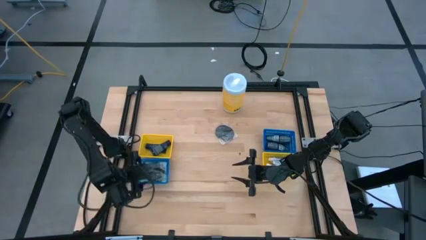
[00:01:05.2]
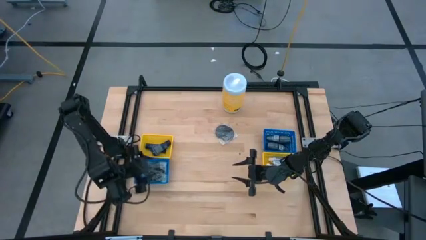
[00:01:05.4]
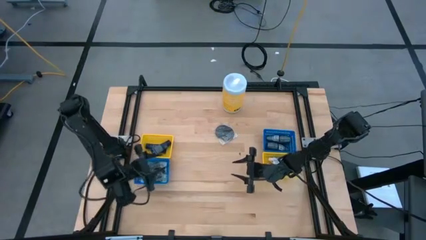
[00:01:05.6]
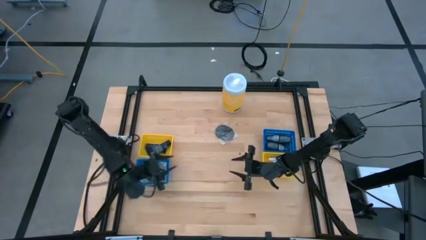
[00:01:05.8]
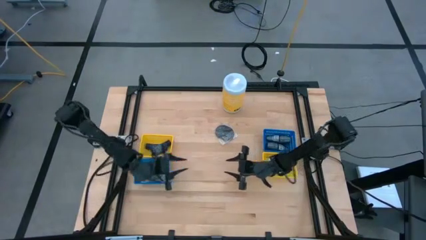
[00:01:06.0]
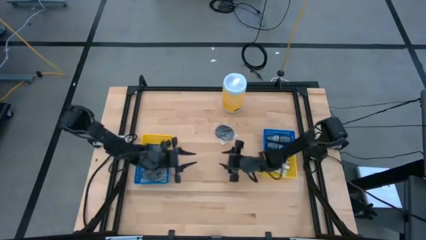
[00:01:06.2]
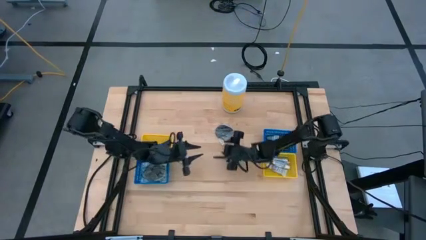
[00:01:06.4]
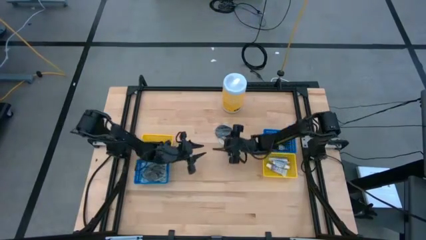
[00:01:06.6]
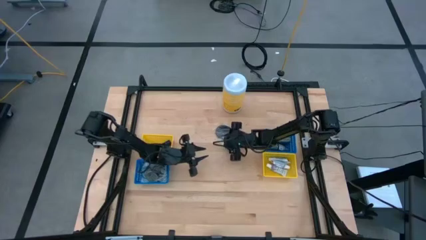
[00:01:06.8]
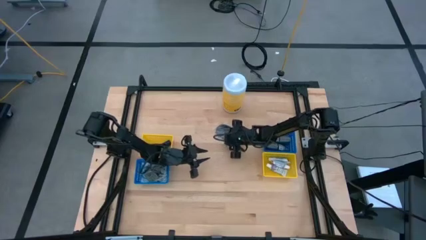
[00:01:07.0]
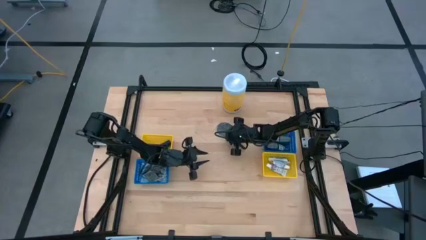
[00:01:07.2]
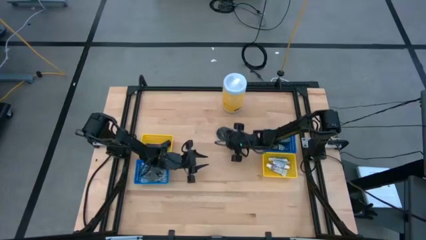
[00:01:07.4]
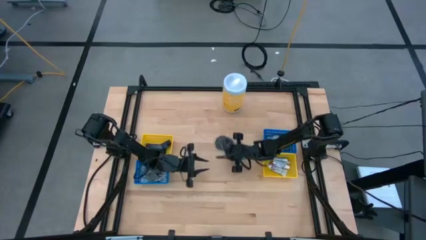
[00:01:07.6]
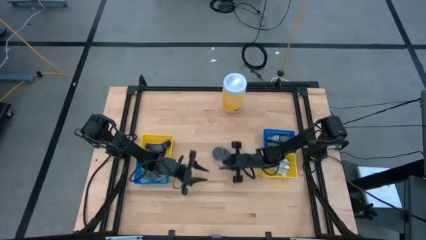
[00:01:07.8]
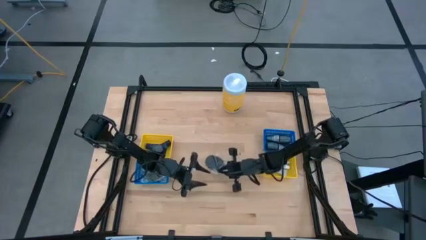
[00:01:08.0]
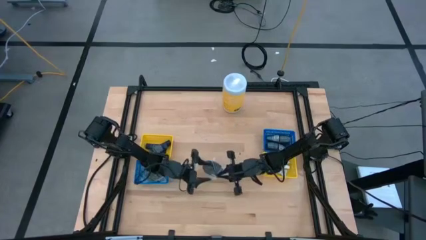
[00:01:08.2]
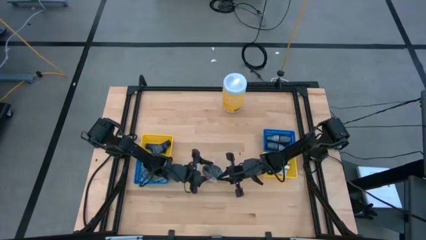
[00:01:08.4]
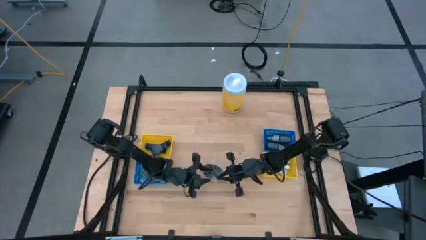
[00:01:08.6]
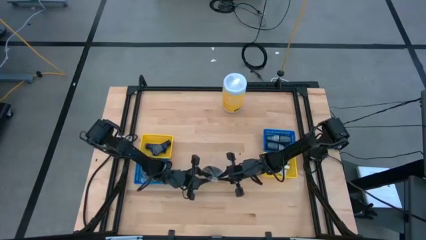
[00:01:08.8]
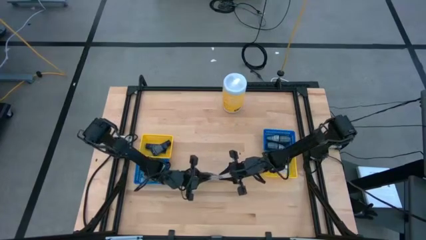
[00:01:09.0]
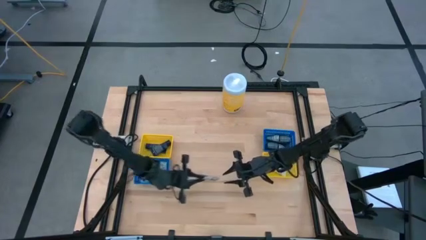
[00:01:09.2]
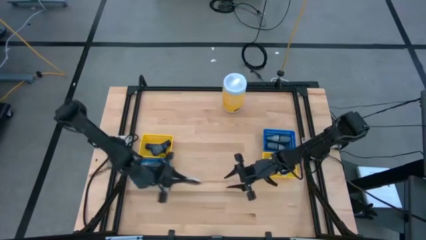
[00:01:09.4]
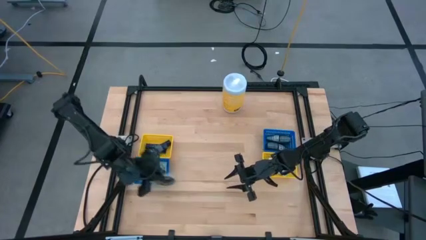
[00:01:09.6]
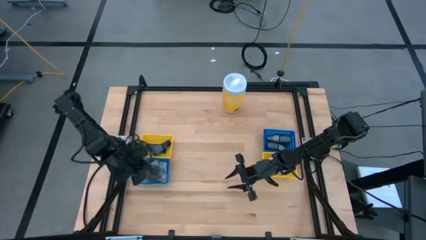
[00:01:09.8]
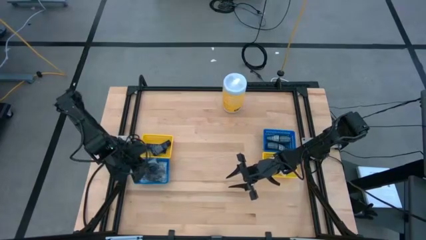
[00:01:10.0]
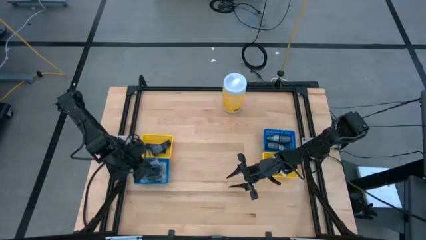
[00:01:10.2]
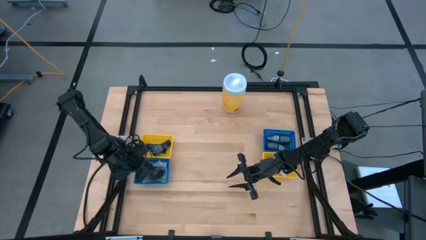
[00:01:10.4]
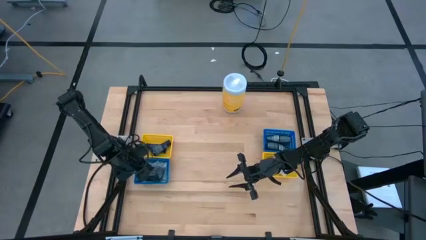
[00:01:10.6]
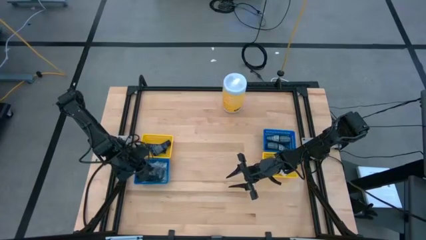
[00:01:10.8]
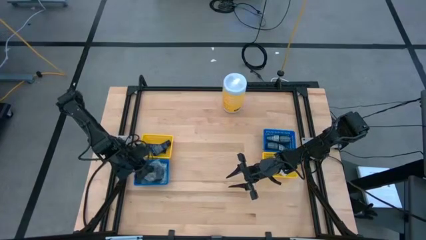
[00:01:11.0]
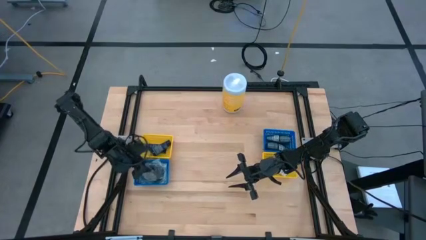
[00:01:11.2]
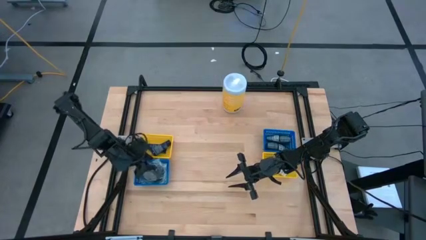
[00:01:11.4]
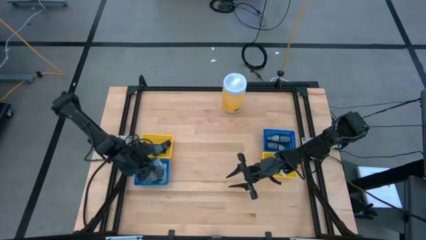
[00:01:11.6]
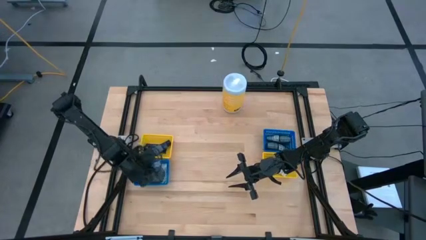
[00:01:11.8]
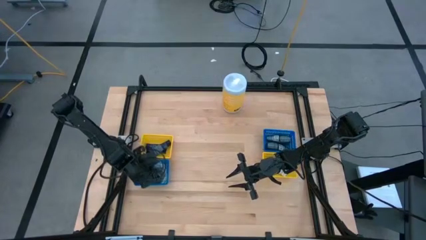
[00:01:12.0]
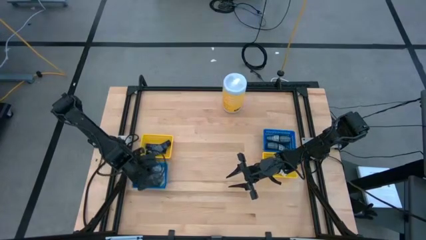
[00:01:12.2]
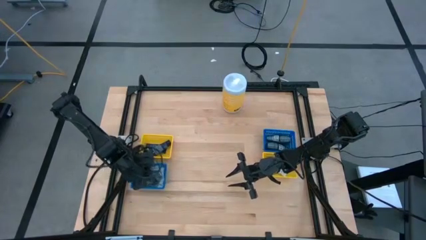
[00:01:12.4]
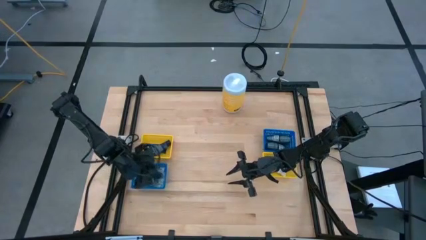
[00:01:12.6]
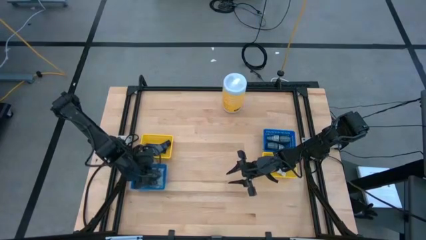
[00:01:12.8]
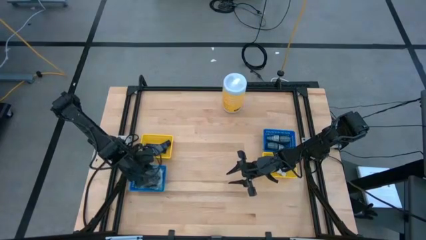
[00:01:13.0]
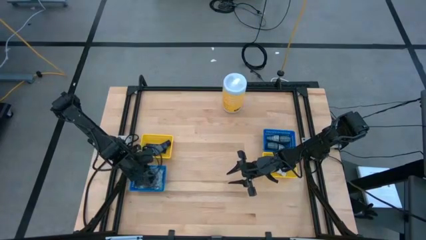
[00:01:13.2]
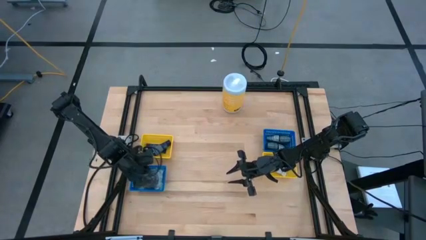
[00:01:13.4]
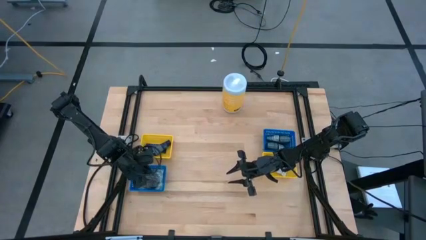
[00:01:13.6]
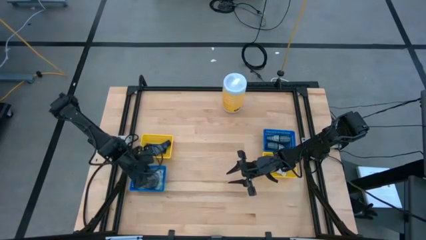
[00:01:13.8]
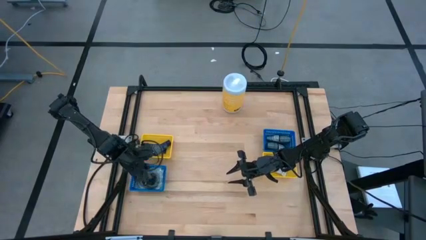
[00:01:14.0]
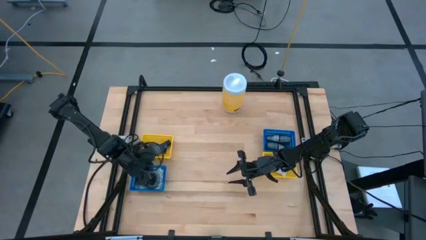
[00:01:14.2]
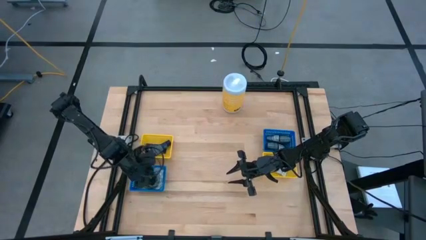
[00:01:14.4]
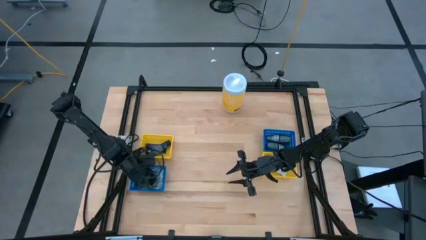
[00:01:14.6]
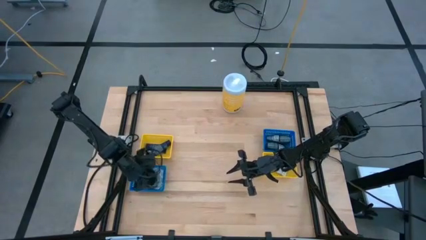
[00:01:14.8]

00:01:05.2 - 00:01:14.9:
Task: Pick & Place Travel size toiletries
Put the black hairbrush into the left blue bin

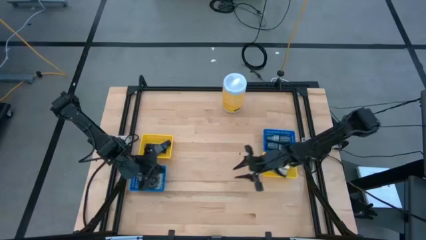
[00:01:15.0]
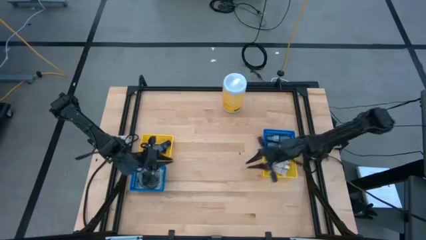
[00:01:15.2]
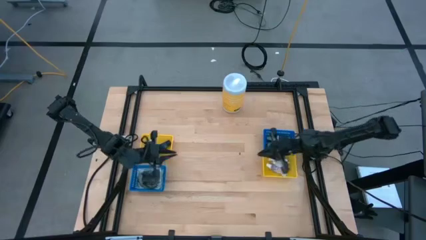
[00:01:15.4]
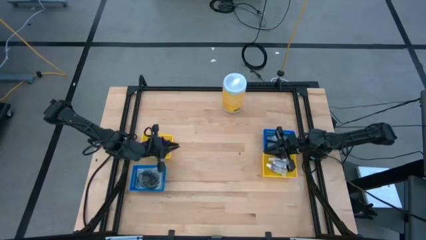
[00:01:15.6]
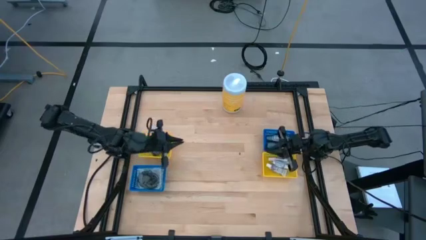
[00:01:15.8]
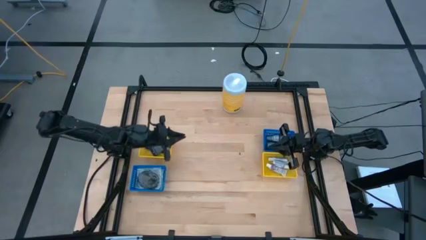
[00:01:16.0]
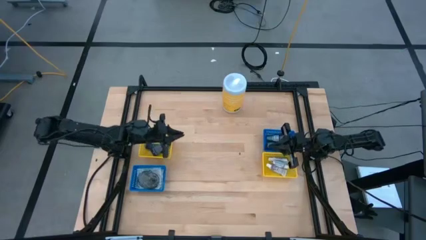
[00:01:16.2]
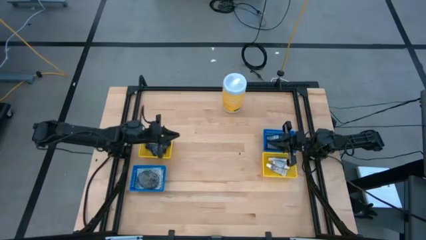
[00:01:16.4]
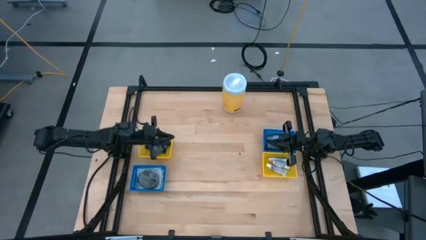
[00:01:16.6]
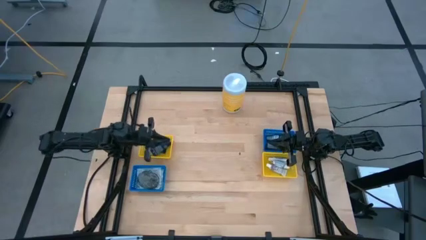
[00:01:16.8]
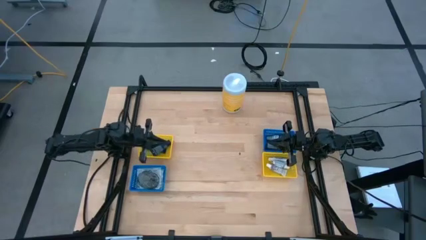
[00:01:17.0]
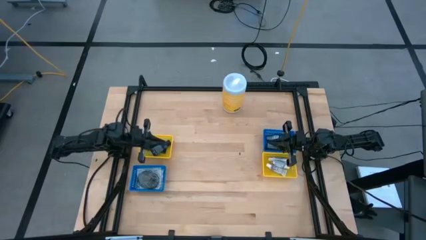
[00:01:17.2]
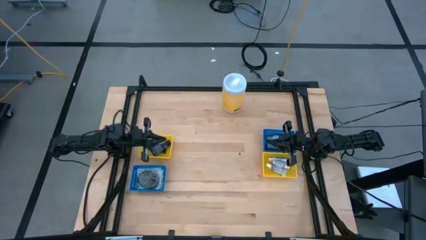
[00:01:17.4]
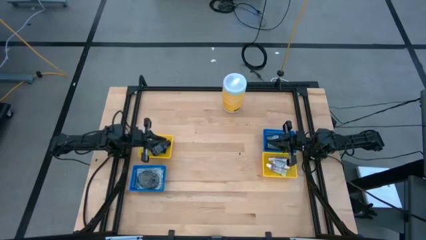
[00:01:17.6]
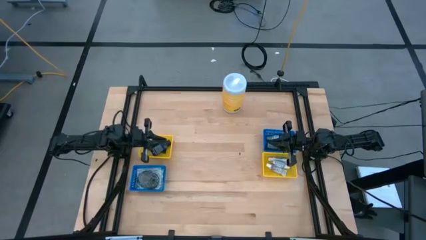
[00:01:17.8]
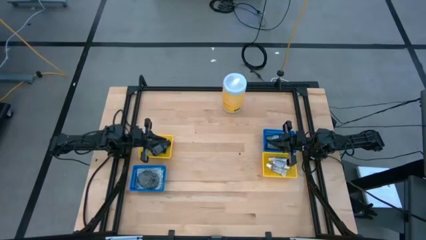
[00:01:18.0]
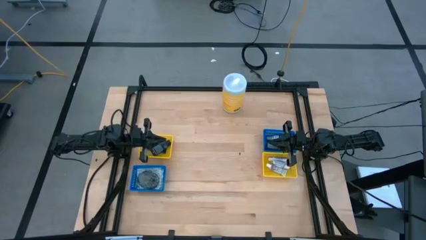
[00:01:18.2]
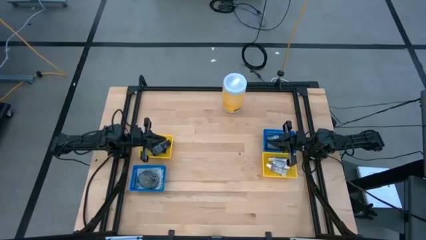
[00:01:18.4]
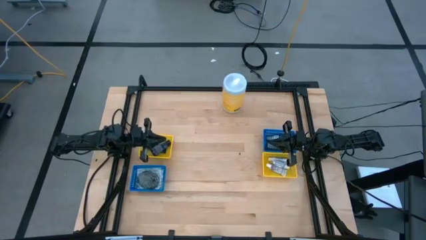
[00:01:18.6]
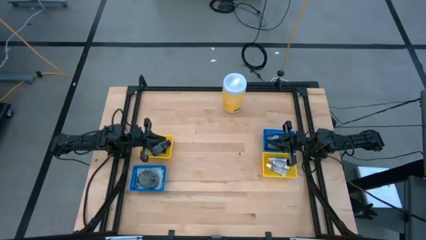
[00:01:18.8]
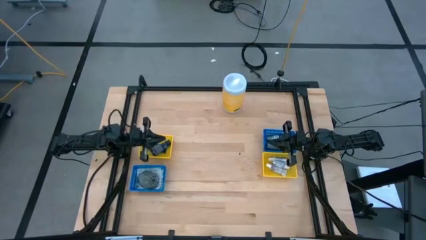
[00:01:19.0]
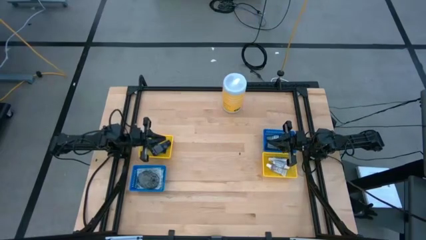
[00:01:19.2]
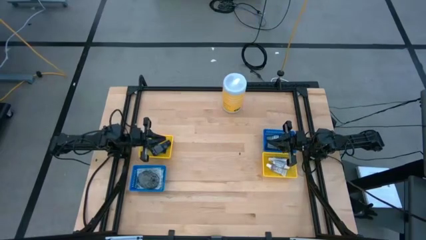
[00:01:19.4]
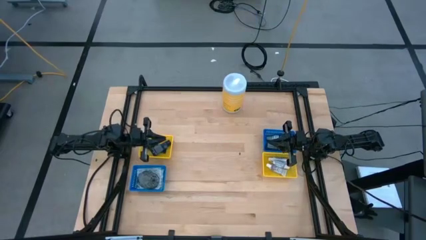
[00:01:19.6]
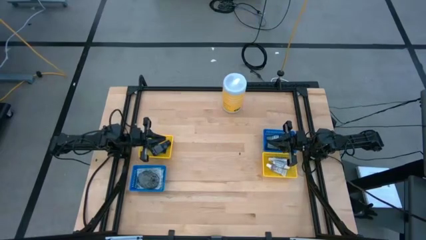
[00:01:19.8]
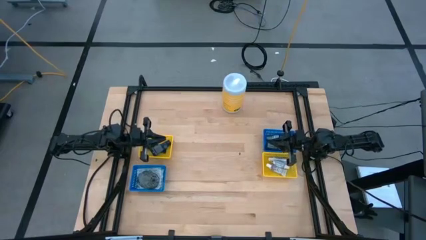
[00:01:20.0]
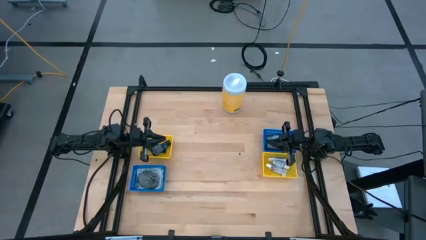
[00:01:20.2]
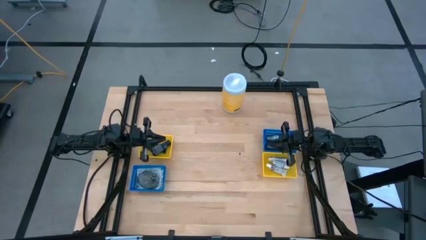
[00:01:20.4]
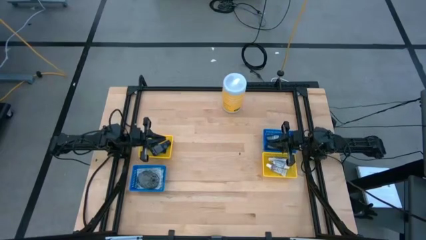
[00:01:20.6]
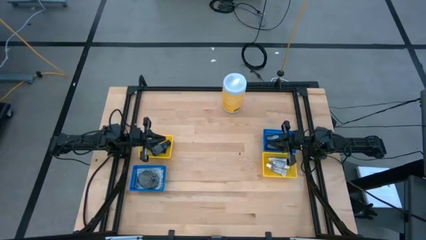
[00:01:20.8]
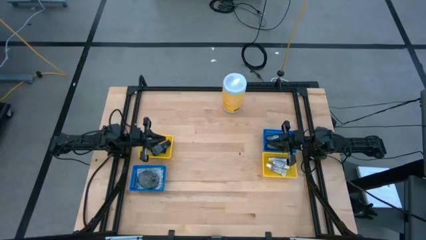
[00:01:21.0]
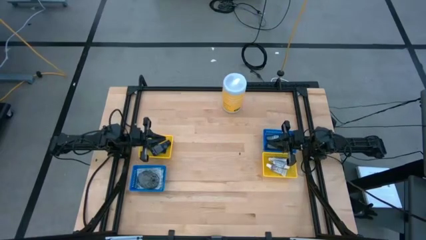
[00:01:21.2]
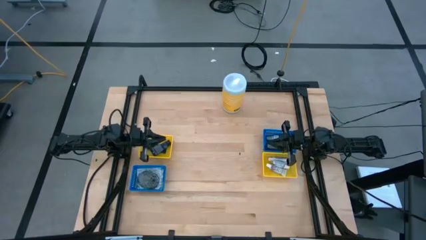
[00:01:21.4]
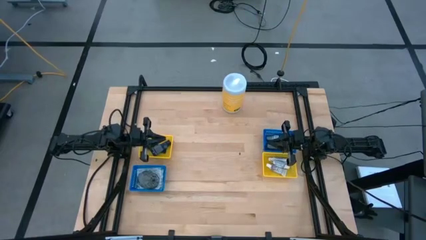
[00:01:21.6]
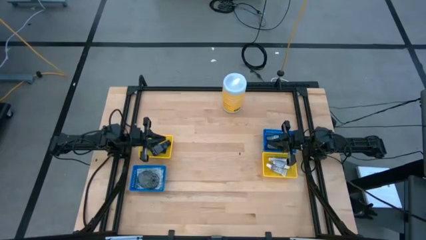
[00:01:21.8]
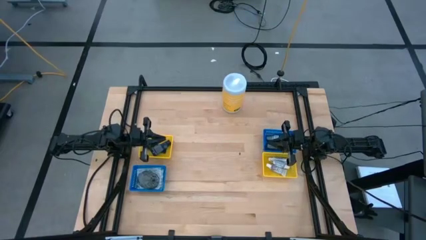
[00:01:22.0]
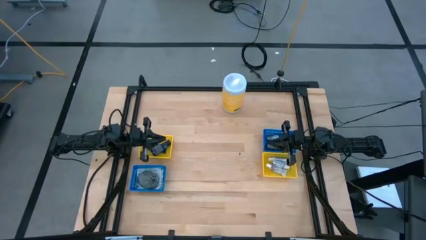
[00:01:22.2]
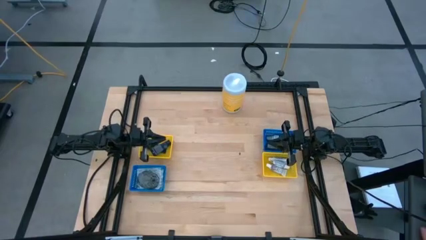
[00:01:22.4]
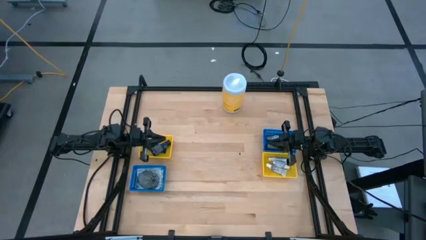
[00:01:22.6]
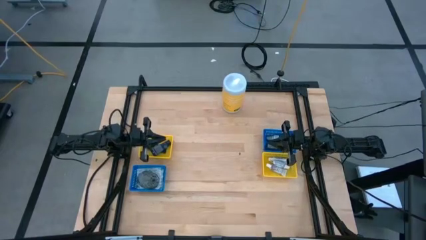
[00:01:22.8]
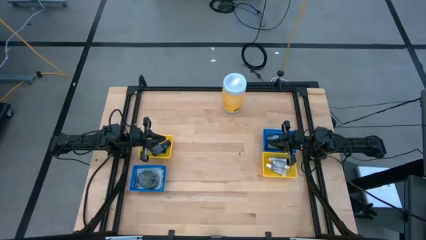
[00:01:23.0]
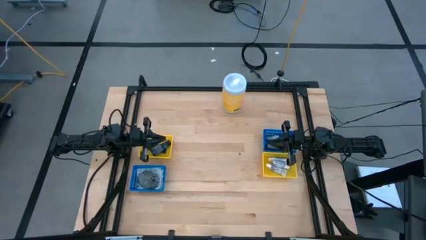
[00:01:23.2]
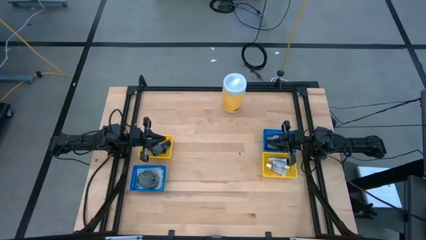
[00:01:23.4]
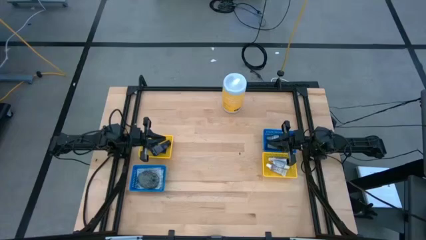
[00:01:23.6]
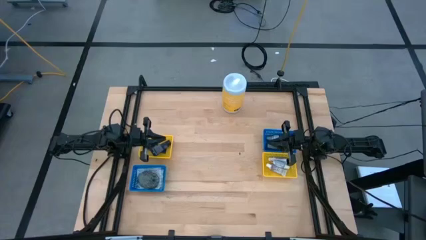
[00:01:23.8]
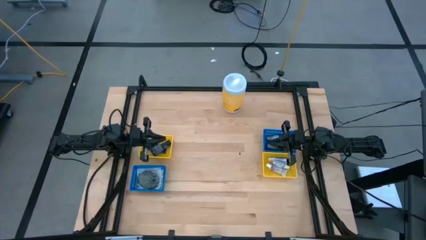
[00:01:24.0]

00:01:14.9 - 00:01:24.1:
Return to Home Position
